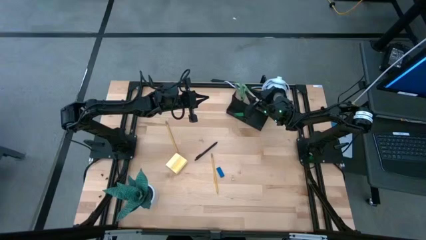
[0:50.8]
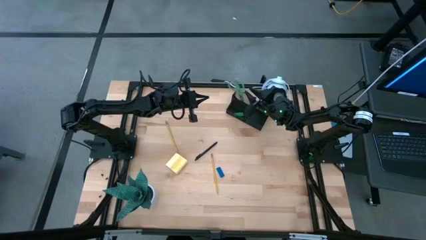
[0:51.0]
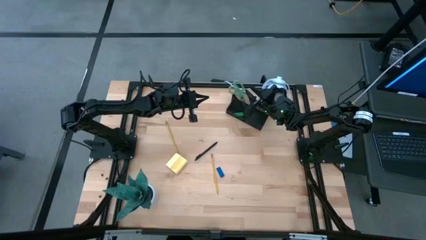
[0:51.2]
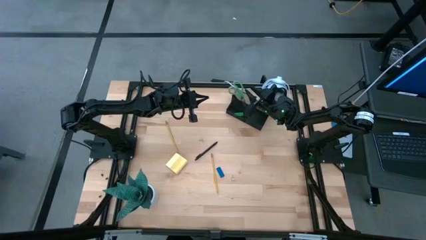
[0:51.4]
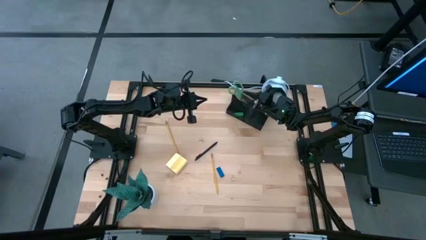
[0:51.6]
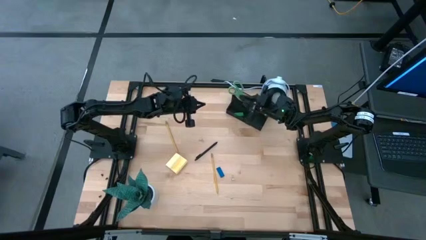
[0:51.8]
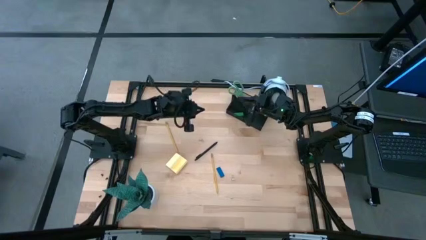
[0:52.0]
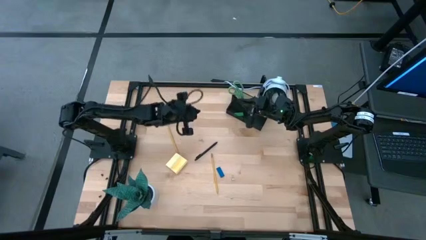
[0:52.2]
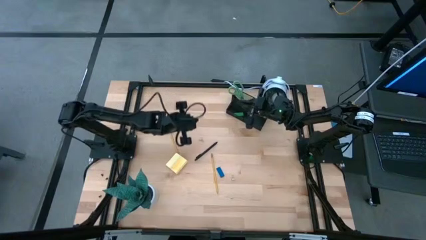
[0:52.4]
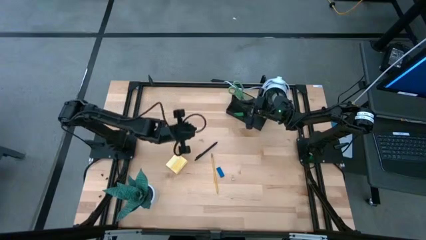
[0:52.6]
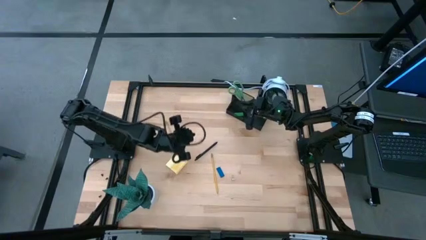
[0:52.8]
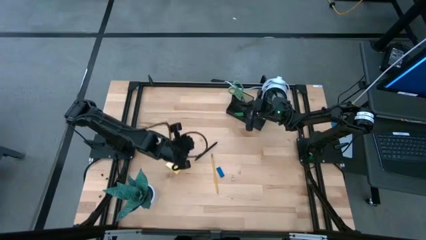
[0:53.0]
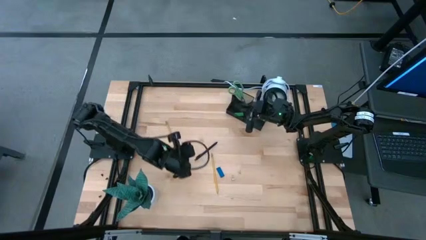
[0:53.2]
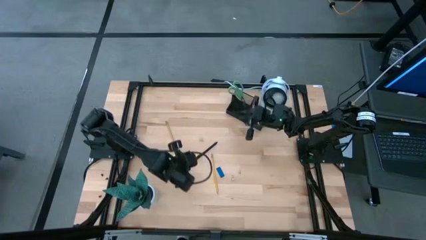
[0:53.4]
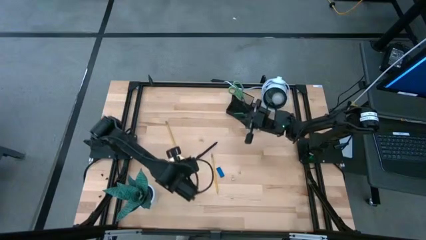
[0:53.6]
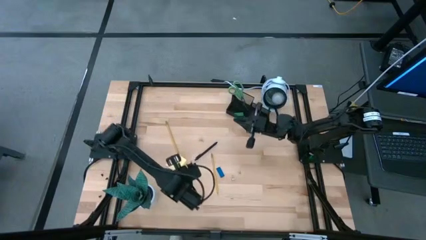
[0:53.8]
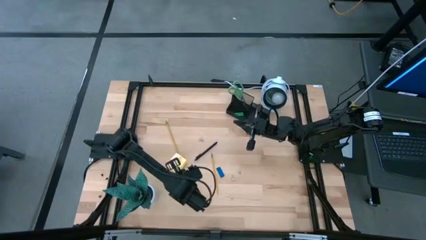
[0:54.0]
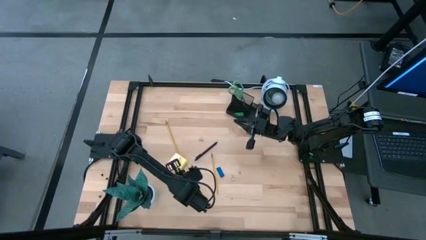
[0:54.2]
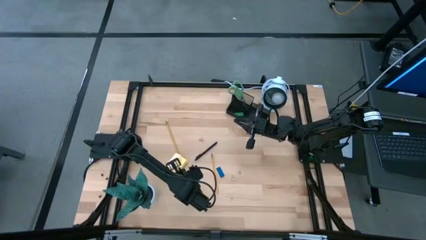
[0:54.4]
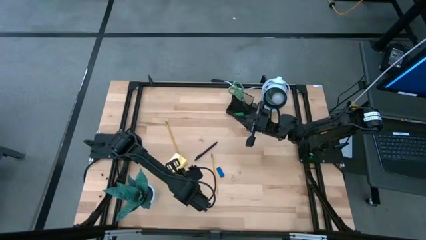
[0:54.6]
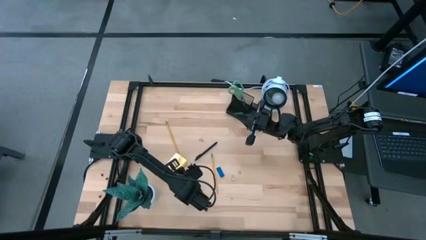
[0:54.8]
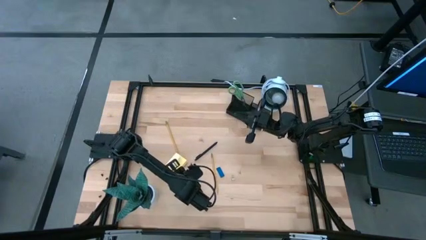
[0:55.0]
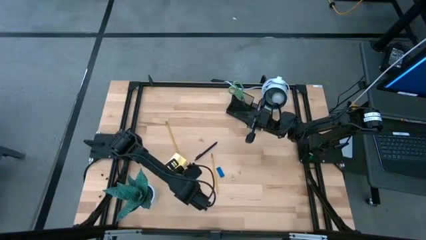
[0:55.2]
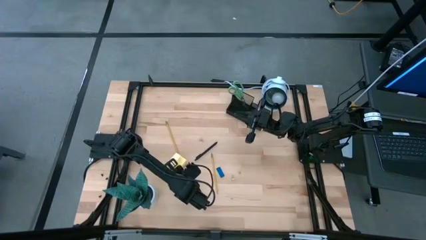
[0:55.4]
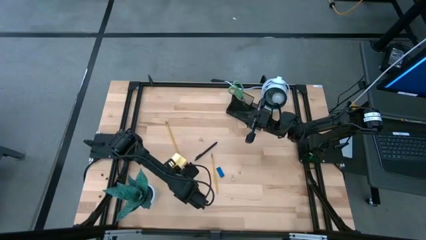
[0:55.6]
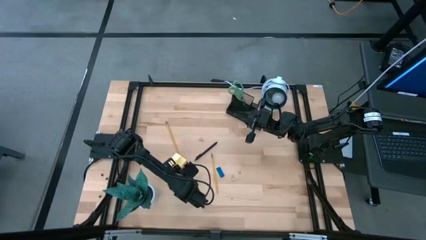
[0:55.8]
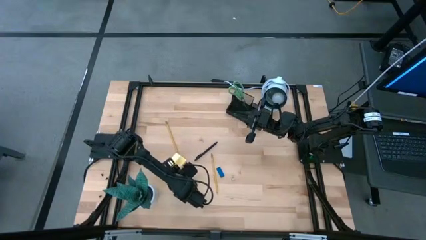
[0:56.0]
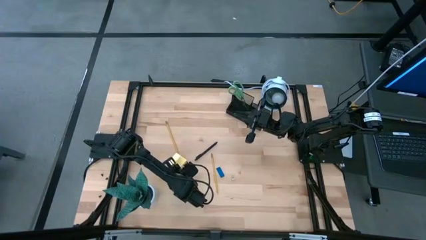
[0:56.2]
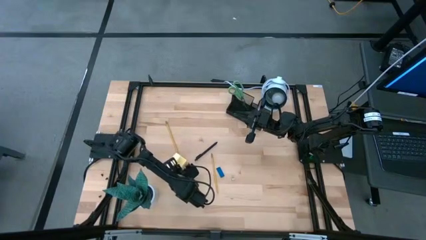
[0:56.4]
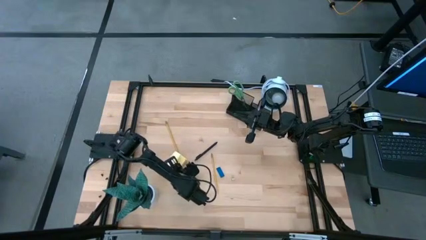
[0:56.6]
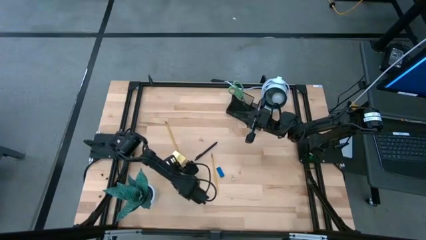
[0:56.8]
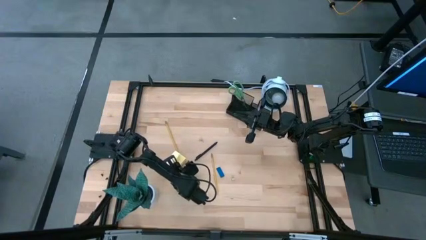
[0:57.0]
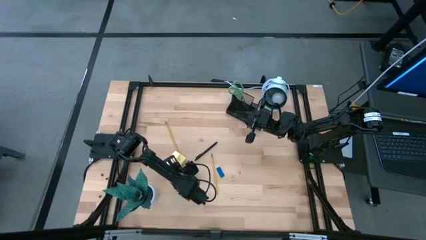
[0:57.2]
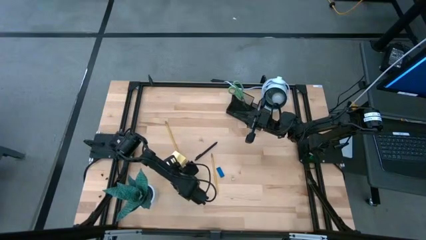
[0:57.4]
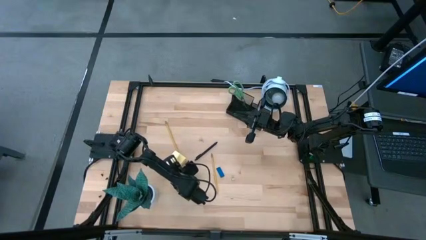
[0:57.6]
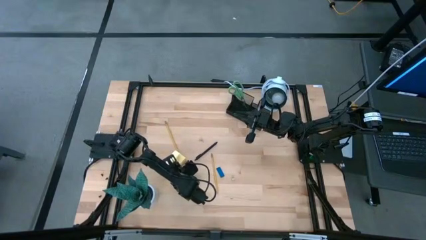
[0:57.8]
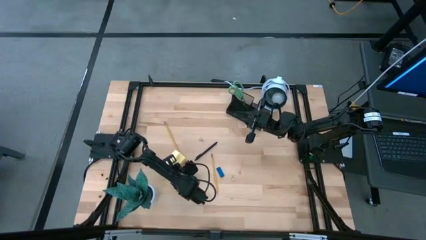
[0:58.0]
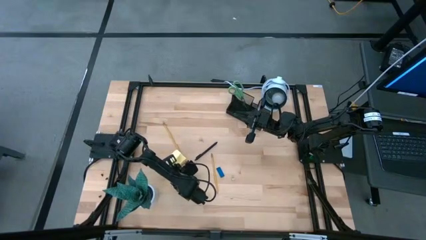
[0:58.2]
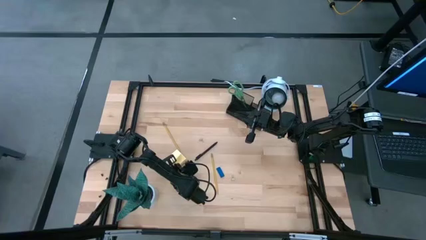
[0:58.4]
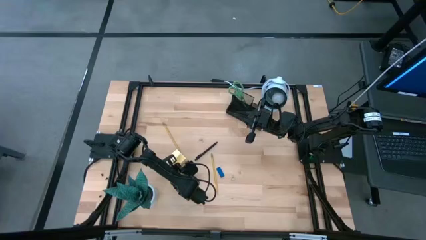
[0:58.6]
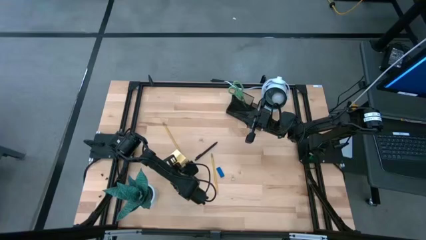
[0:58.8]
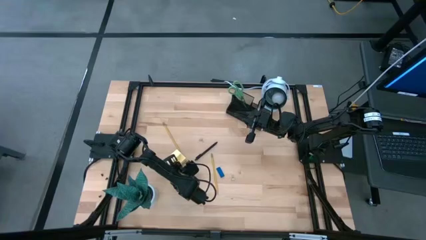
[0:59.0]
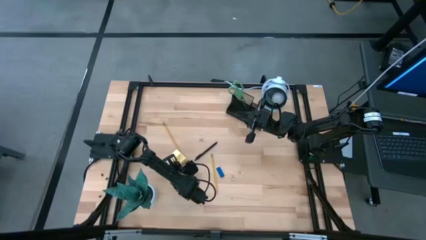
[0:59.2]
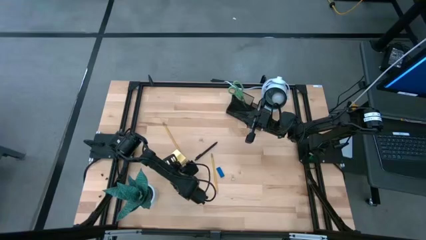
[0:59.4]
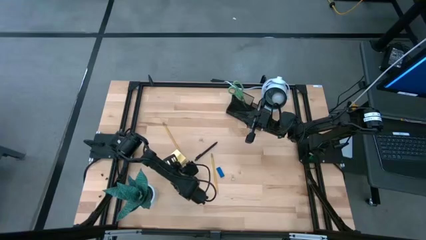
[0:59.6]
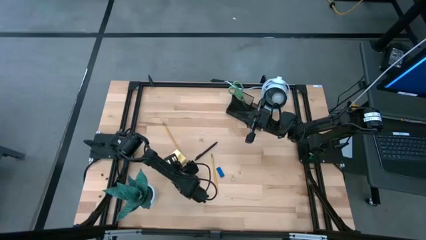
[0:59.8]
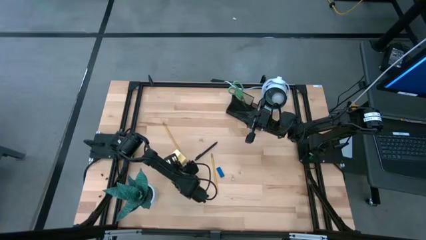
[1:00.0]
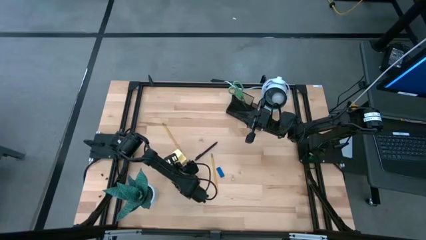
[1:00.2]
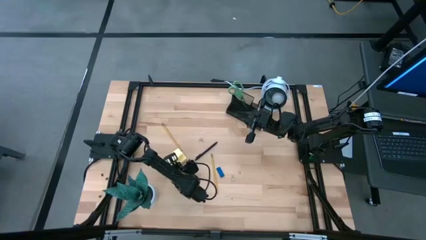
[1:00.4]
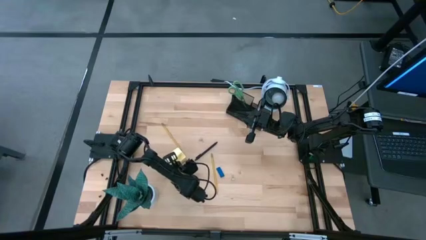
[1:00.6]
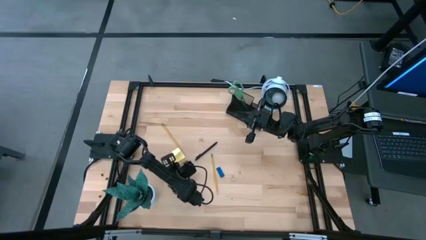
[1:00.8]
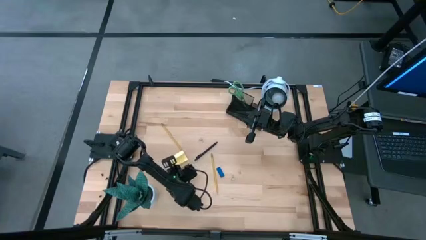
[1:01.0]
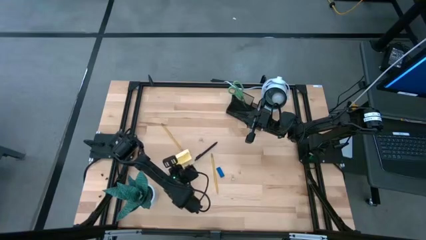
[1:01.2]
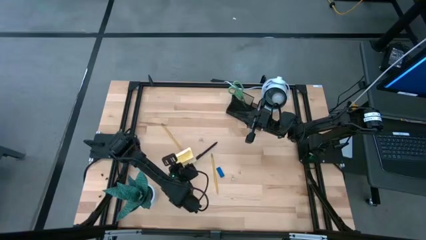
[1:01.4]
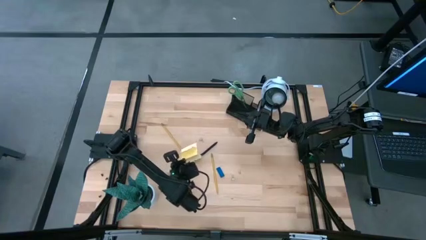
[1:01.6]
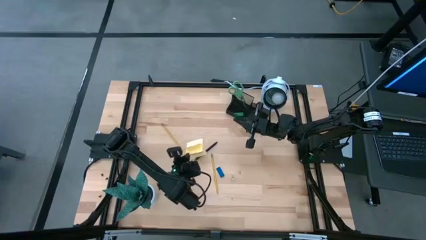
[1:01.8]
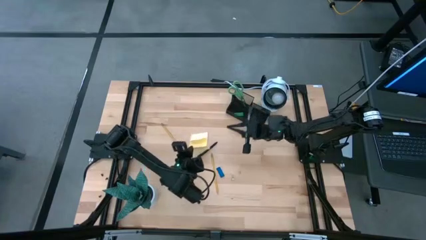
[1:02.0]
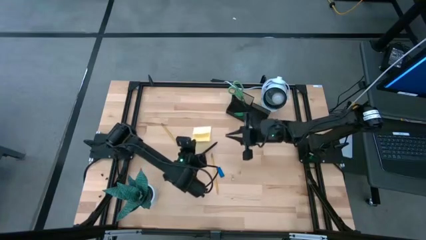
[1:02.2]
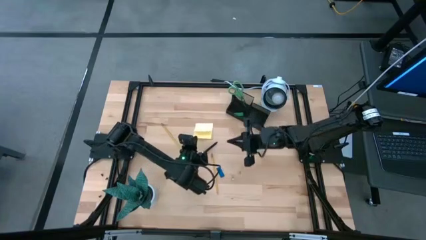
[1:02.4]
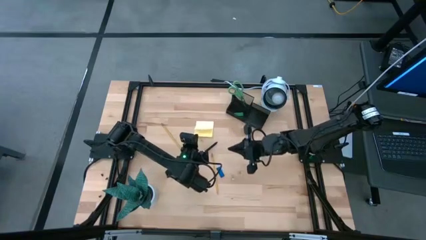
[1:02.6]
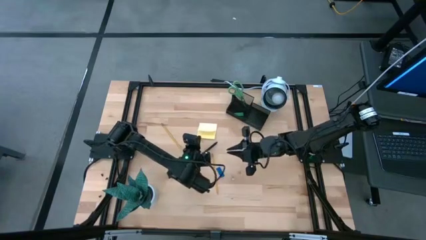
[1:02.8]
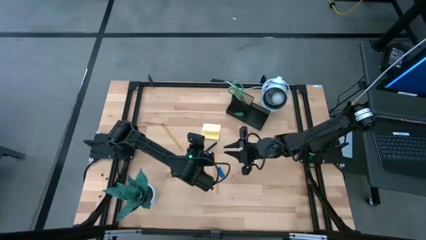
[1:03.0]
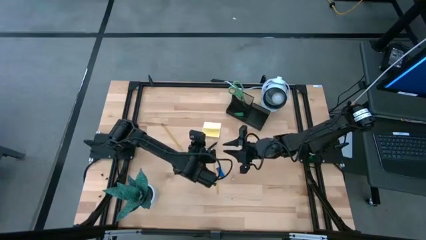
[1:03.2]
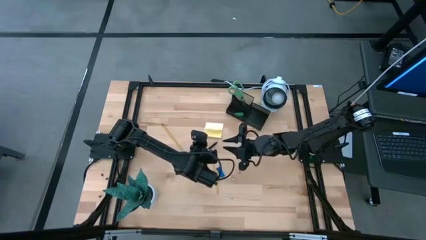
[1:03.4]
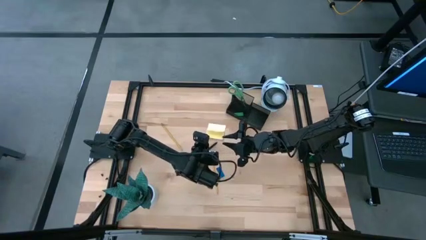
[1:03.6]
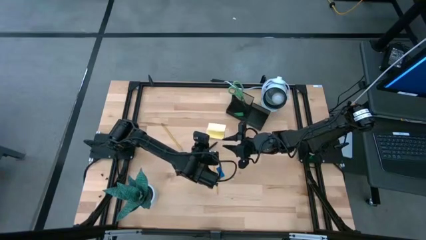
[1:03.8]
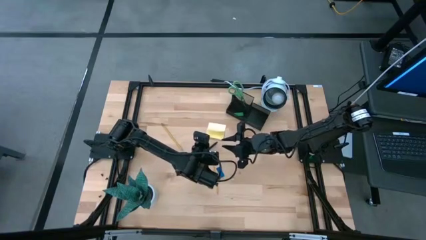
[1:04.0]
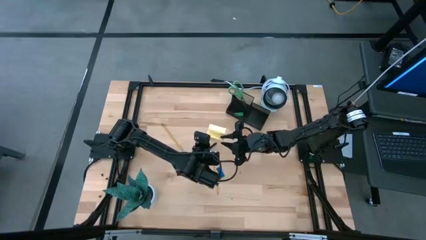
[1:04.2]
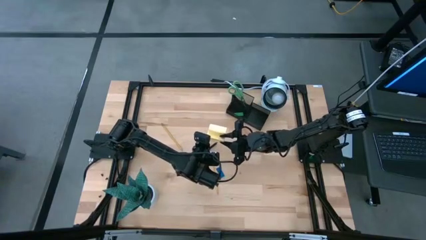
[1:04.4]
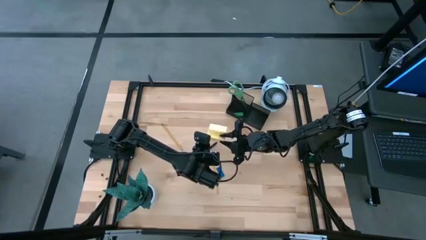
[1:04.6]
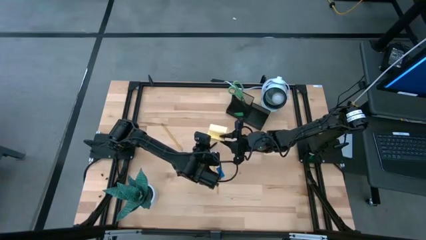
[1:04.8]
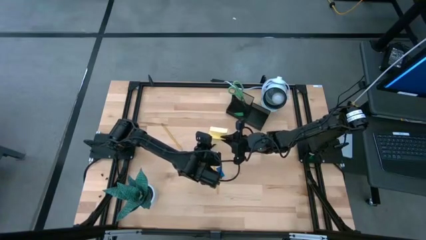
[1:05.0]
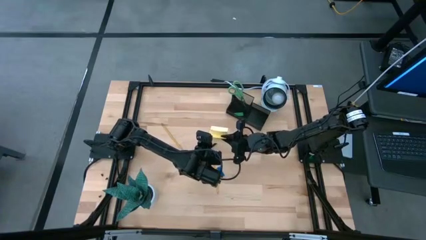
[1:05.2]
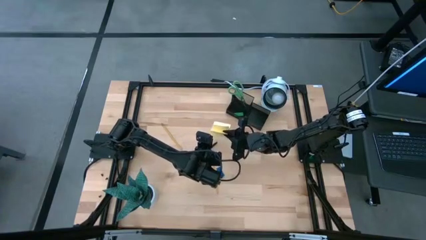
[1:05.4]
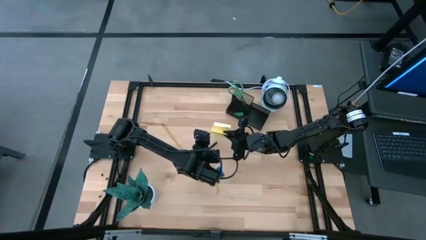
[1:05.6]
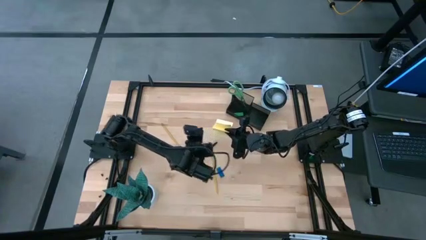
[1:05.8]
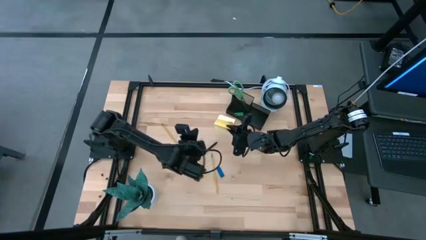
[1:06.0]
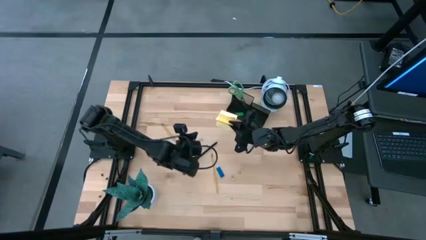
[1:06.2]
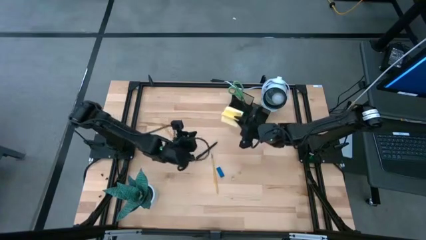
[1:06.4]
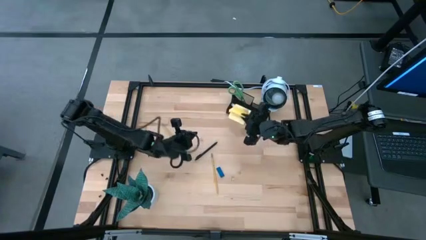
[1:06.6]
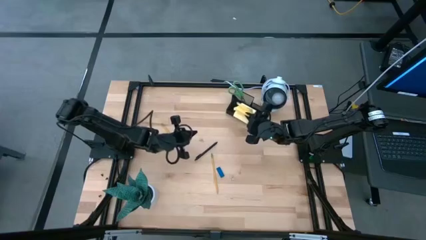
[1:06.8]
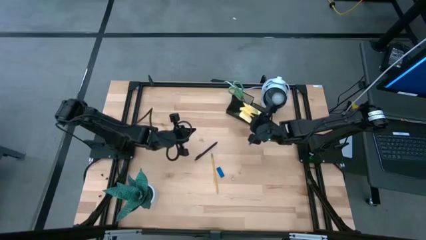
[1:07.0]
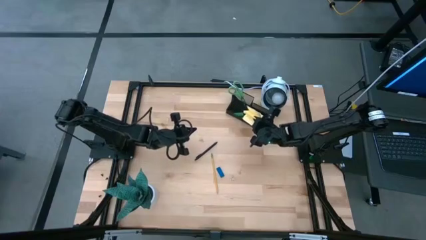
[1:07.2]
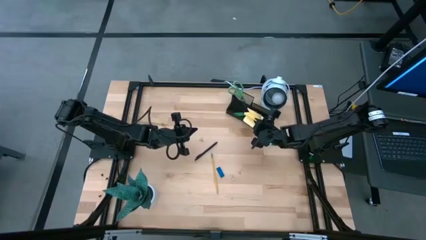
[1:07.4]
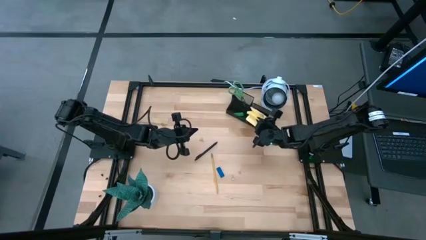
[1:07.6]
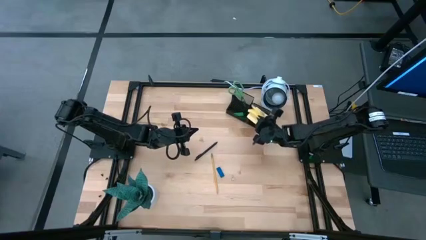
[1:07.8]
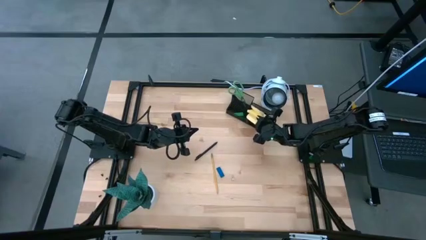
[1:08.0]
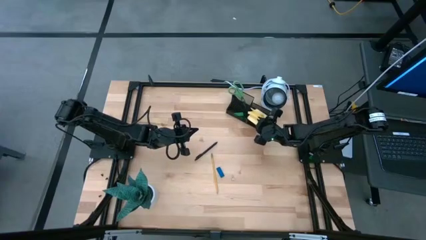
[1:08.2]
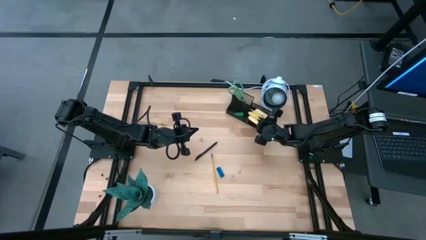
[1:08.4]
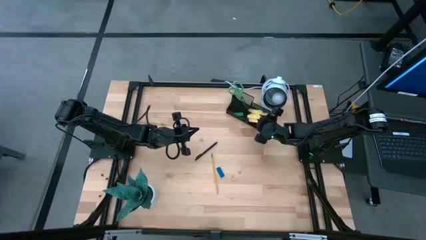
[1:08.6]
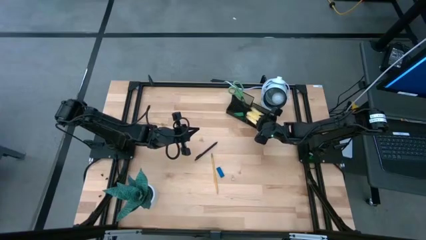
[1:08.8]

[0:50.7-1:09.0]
Task: Pick and place office supplies into organizer
Put the yellow sticky notes into the metal mesh desk organizer
